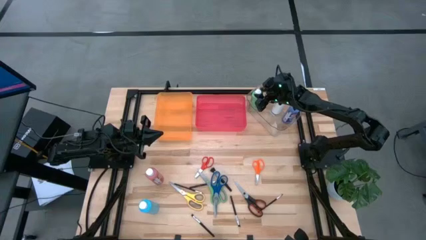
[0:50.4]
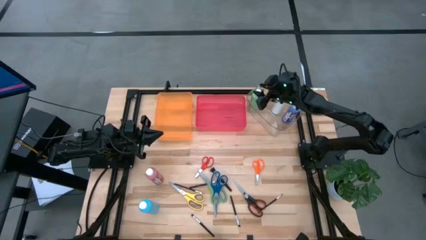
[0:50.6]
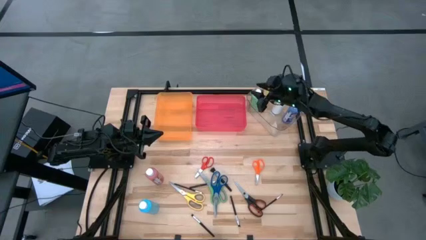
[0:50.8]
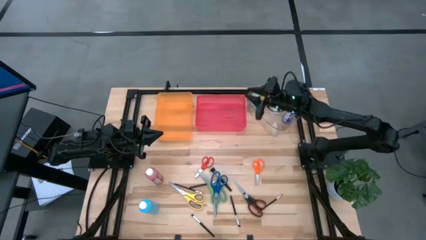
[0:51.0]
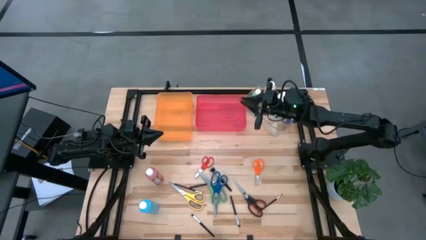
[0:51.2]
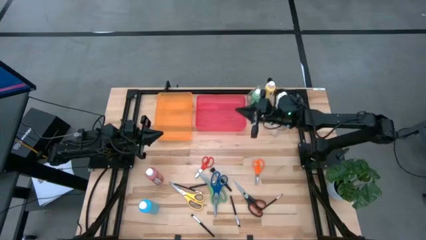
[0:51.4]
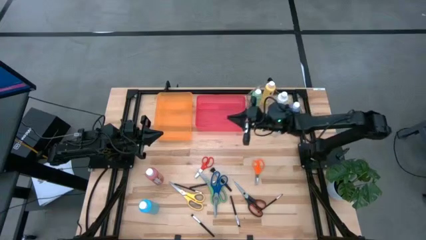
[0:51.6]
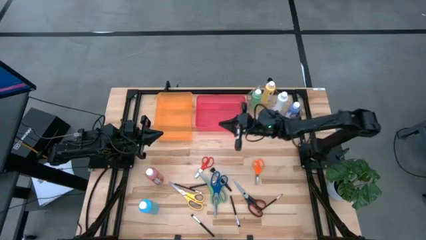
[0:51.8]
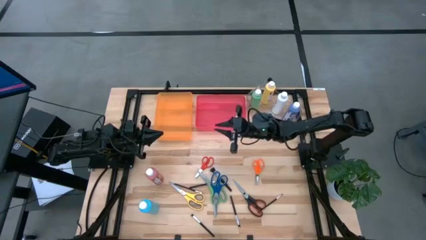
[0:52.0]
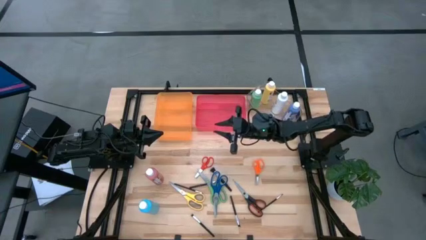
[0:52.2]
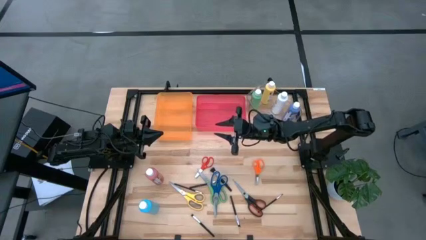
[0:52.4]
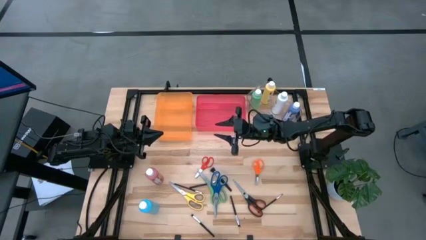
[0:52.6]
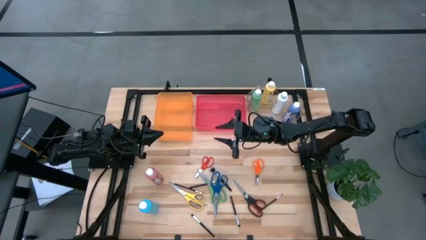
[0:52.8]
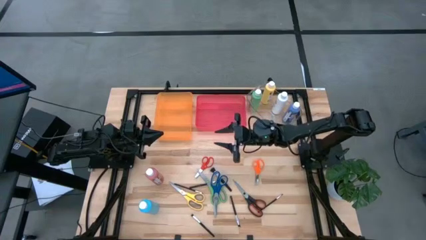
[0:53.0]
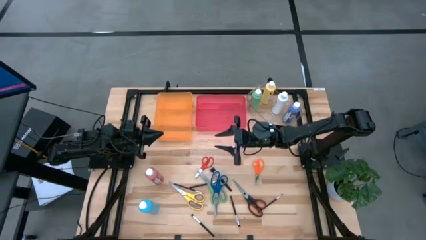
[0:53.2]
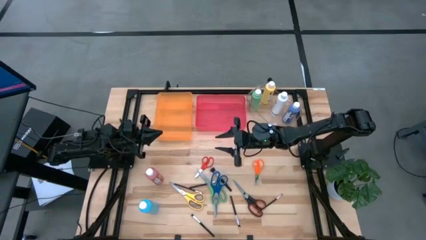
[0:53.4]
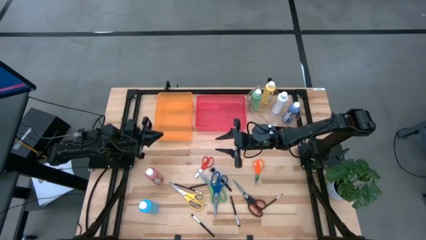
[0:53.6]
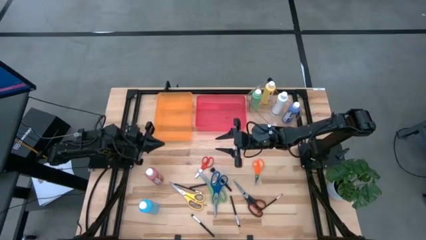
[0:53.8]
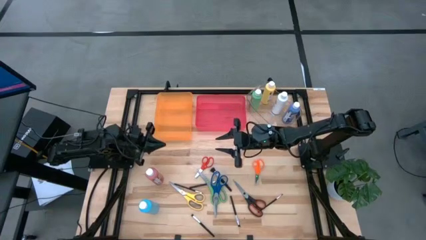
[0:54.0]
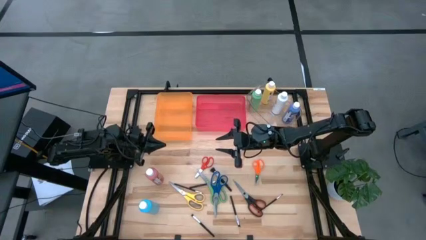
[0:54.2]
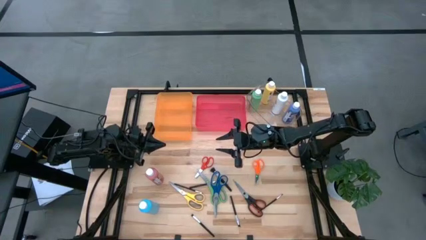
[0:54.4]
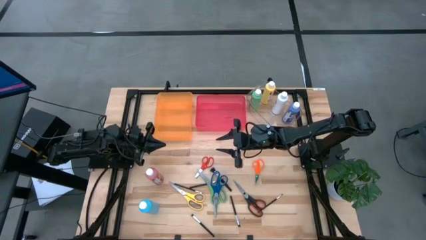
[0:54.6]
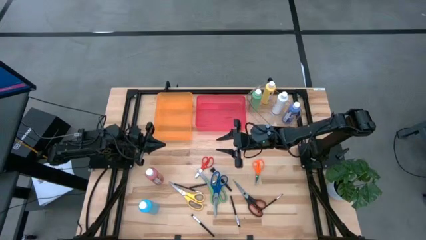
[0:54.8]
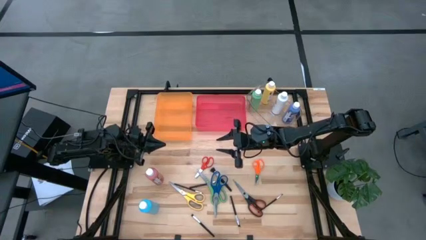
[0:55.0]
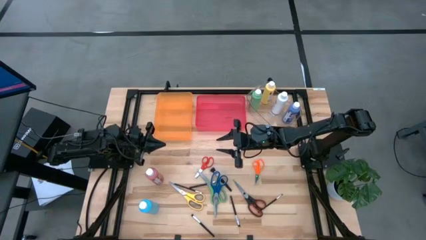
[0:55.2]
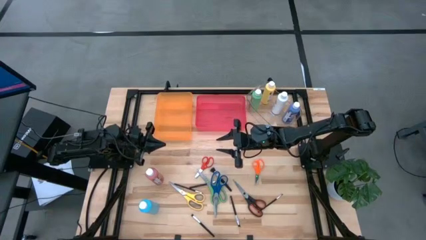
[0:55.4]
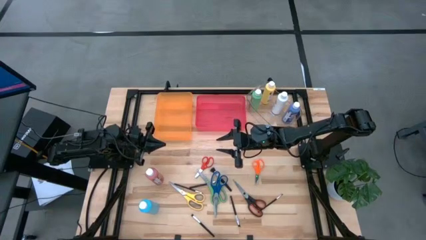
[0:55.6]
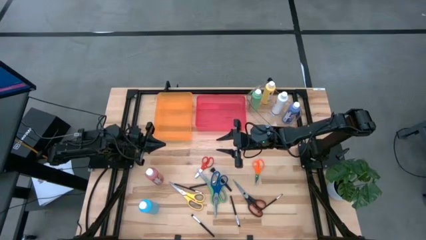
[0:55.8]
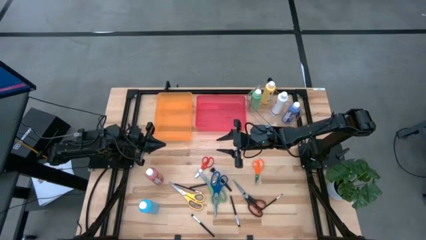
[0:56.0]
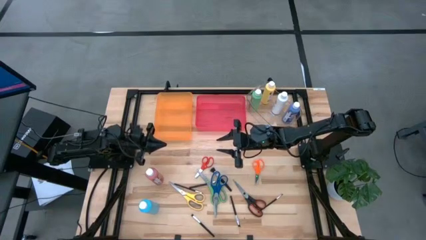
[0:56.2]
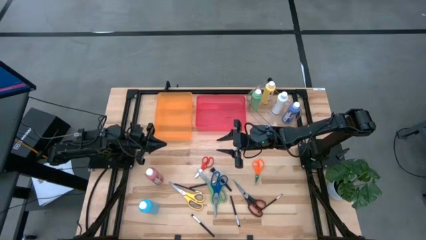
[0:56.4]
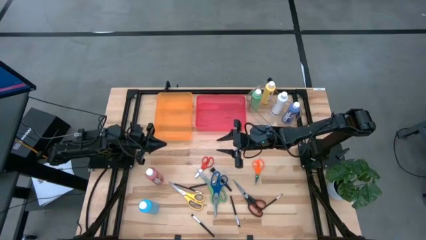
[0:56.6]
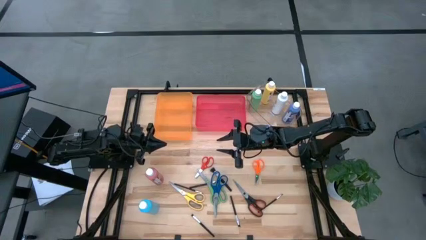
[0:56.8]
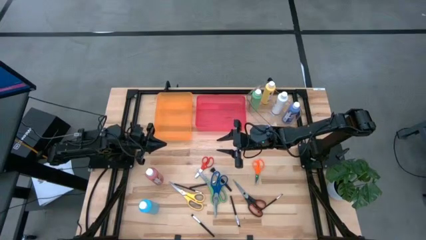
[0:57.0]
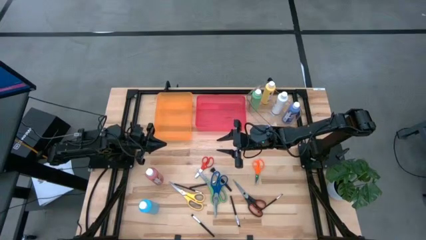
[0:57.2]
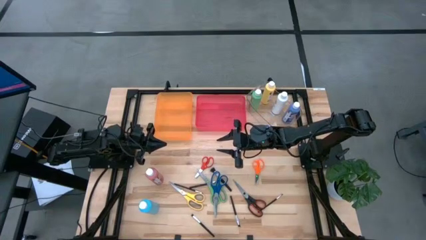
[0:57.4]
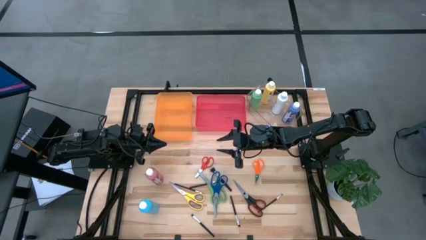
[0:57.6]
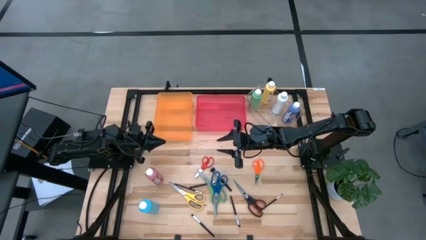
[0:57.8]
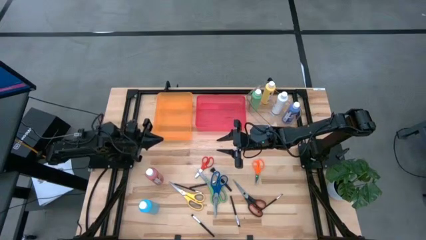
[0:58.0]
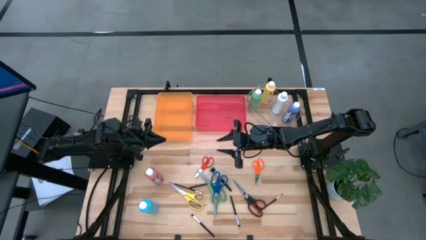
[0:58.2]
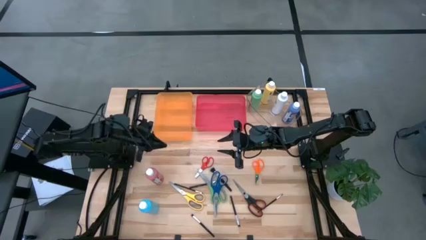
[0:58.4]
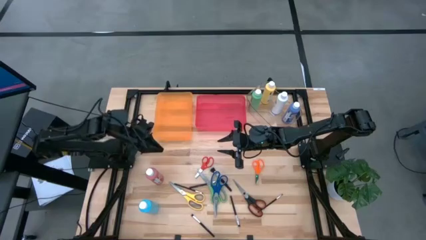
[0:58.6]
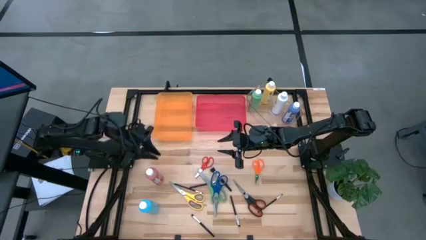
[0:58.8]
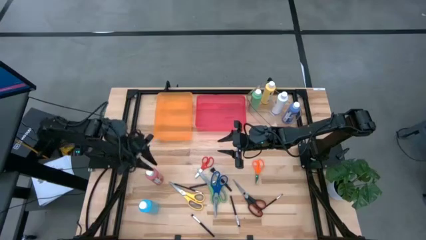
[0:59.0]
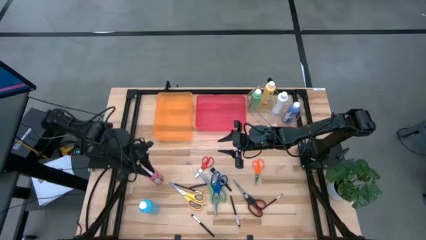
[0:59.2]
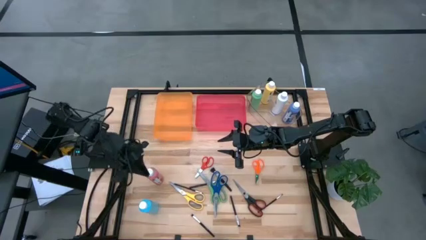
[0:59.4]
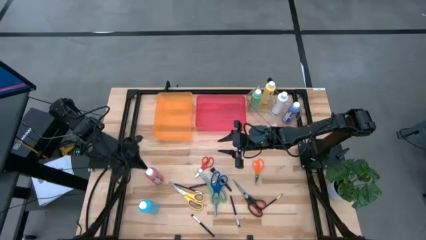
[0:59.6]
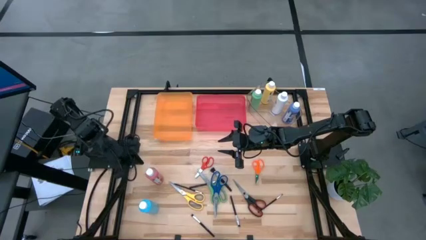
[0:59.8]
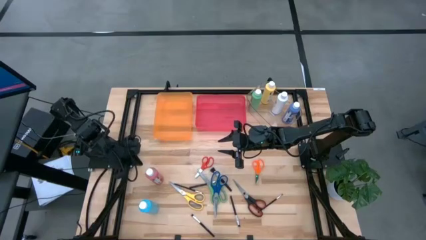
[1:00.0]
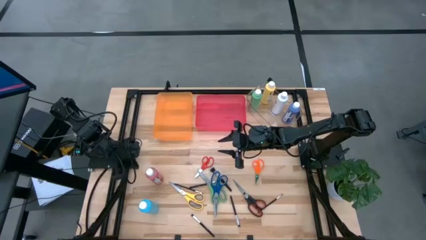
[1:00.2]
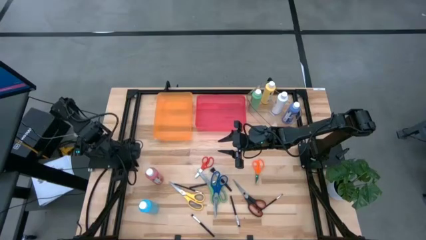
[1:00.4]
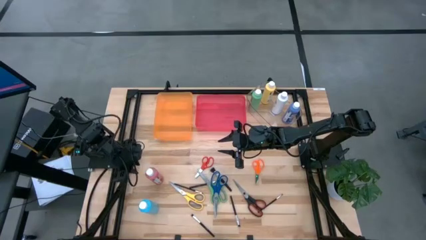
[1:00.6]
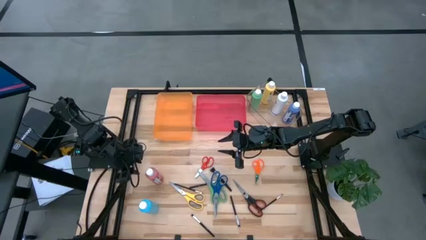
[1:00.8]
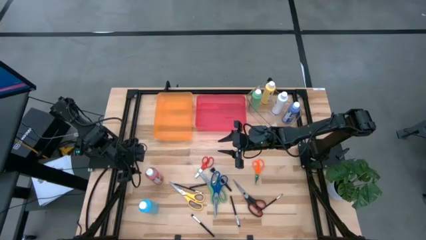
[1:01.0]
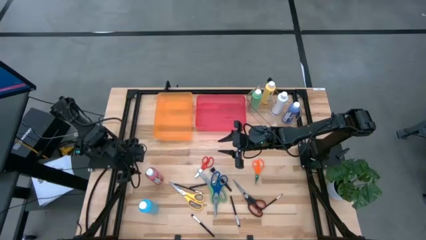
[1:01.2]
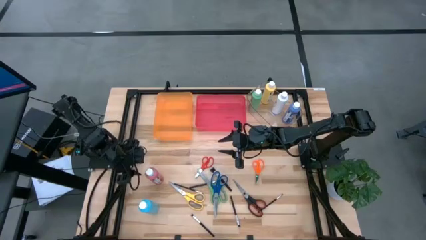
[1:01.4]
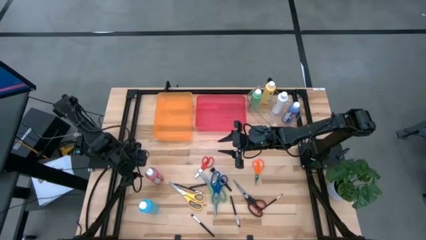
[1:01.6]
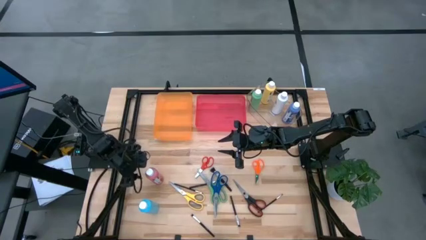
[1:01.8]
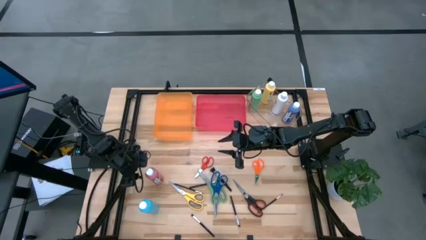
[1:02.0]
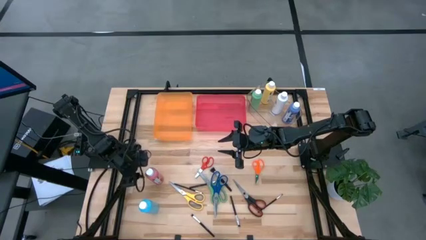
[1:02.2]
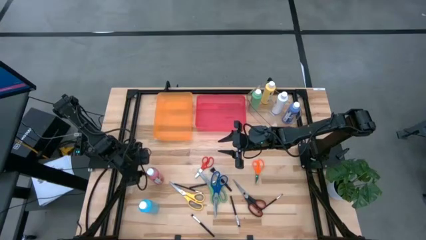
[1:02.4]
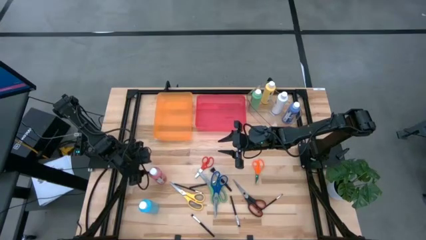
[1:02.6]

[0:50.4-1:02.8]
Task: Pick & Place Paint Supplies
Put the pink paint bottle into the transparent bin

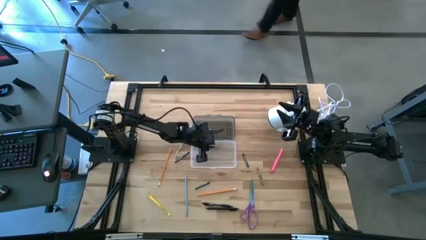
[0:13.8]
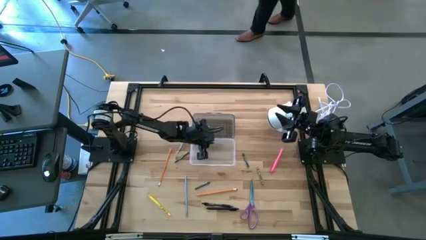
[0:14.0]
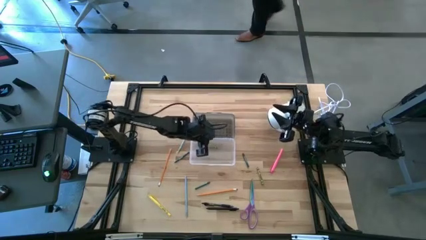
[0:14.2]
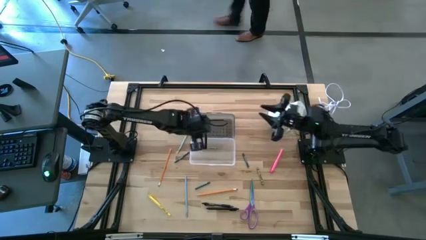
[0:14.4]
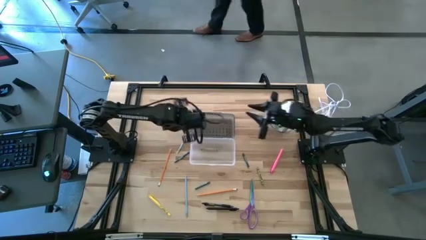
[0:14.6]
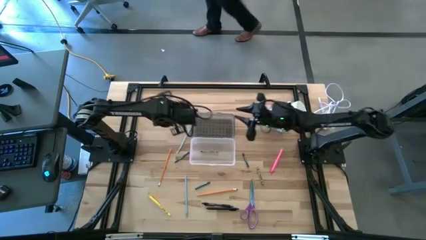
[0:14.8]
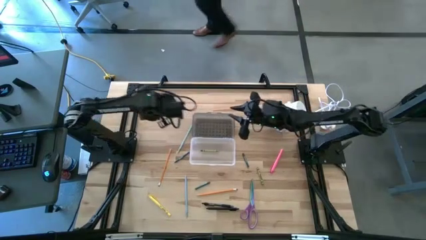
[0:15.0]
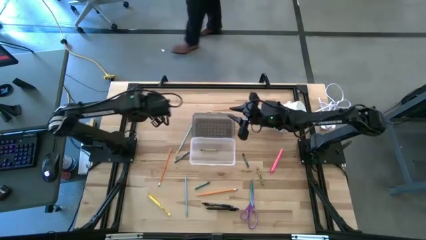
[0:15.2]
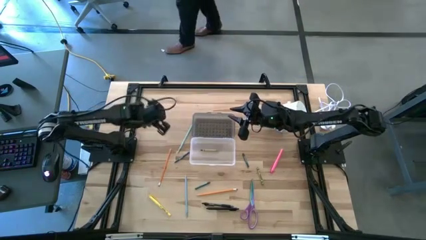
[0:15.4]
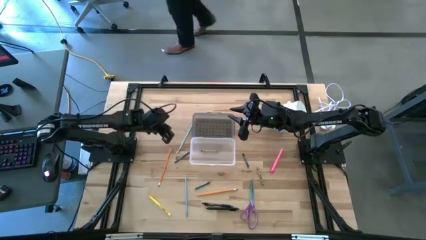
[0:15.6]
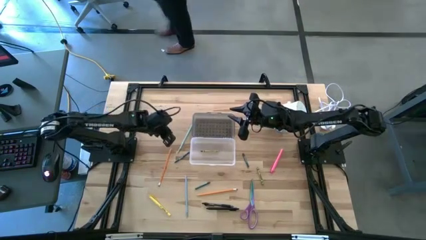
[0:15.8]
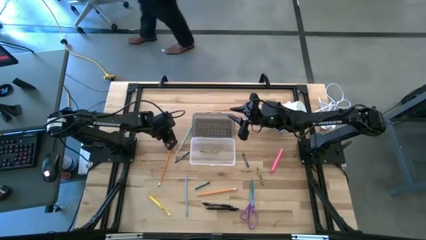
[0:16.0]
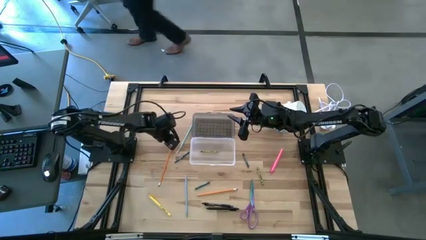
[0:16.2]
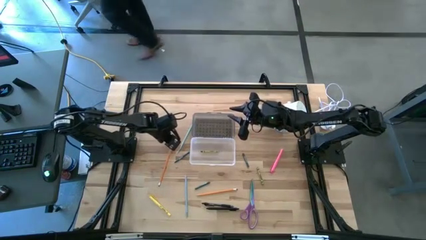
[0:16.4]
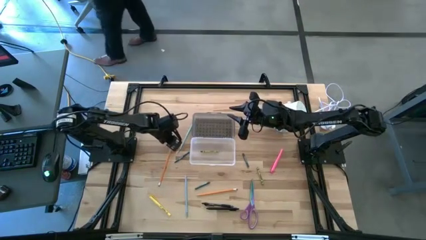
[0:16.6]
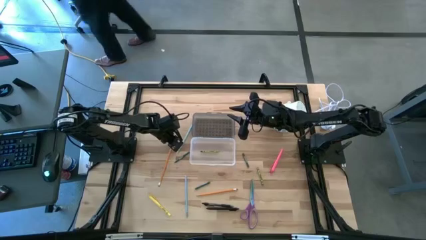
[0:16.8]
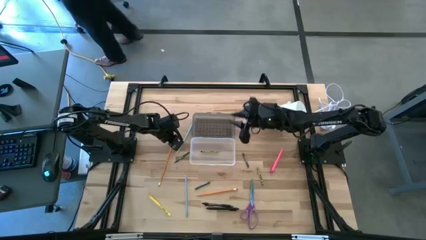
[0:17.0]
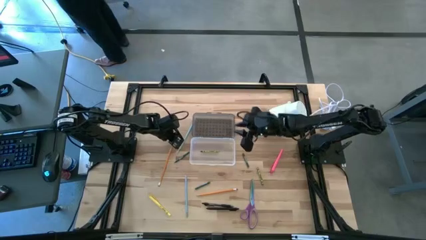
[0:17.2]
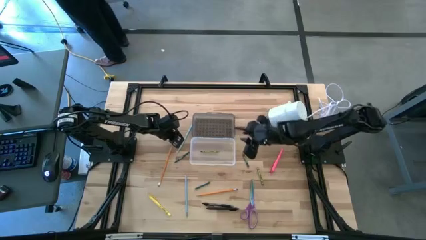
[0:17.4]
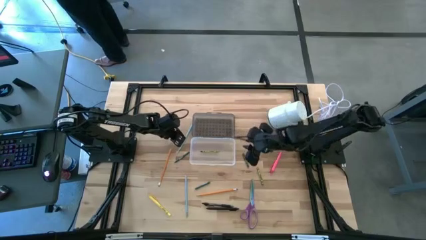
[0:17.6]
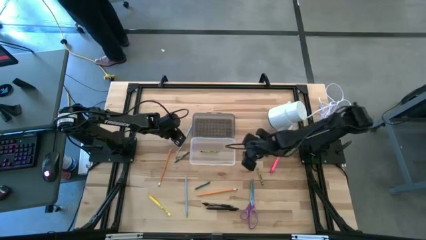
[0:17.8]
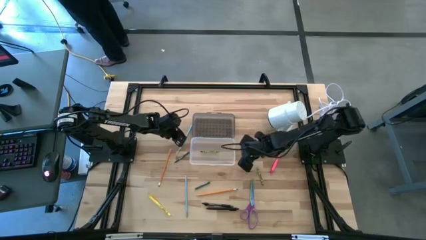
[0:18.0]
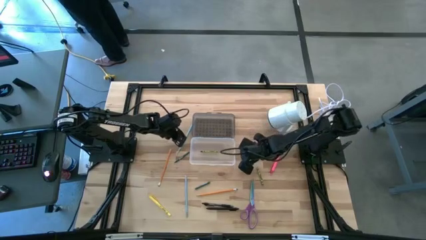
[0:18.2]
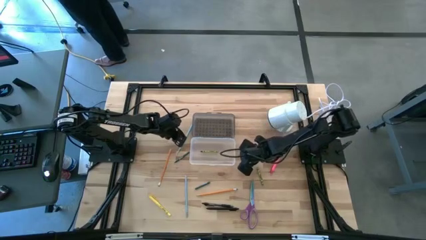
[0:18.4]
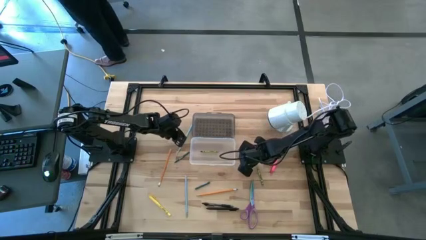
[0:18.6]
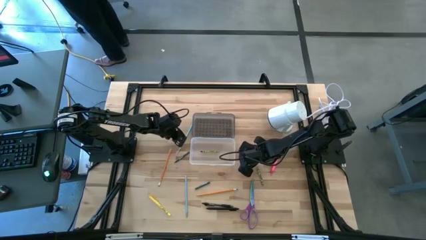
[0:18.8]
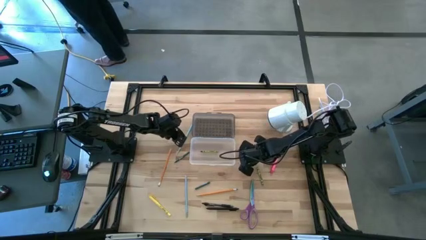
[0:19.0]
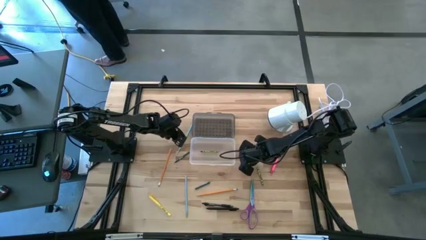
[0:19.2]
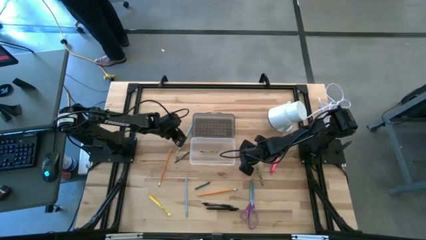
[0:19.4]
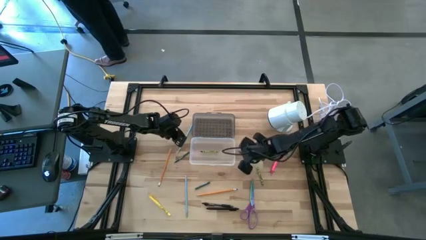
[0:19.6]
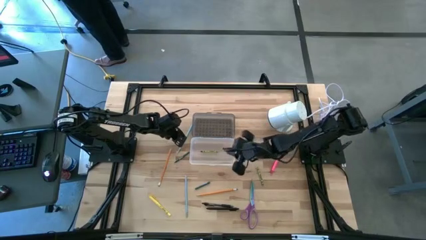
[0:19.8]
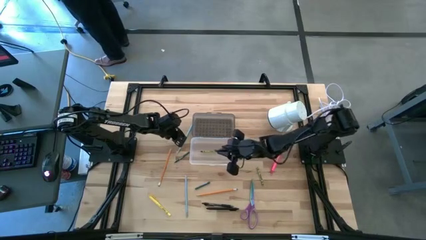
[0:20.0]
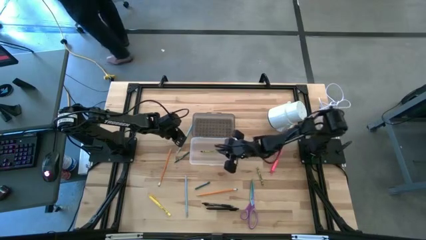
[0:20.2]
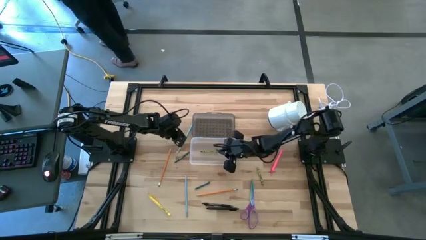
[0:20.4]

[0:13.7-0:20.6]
Task: Pick & place school supplies into a supply box
Put the top right green crayon into the gray supply box
